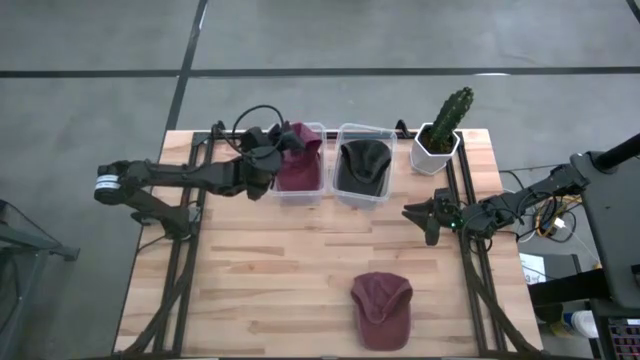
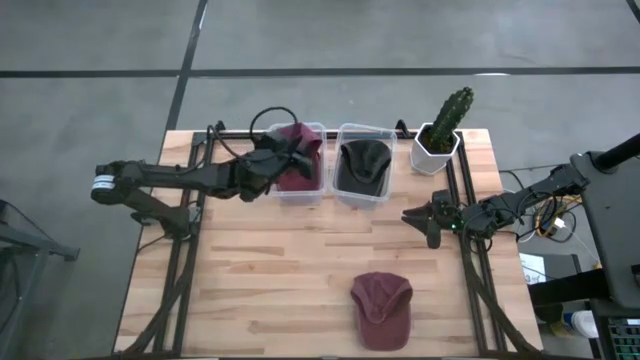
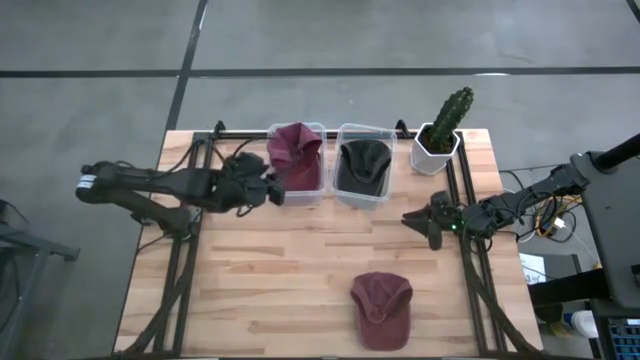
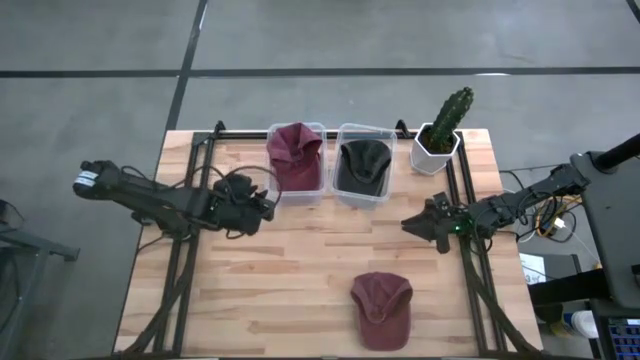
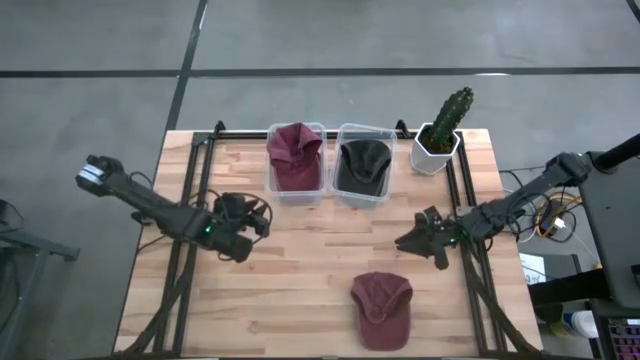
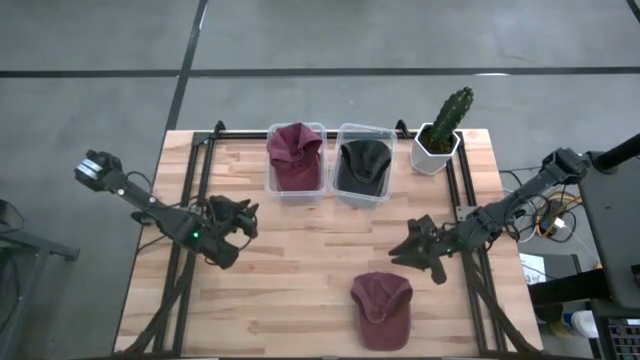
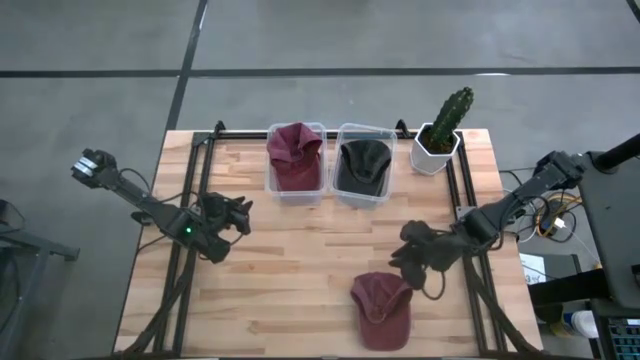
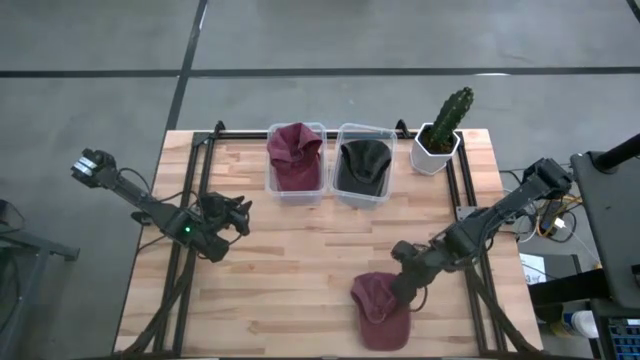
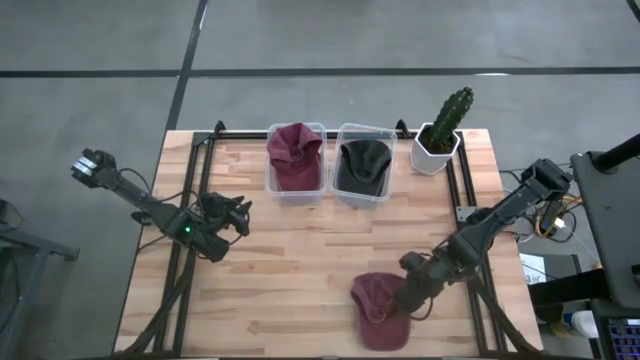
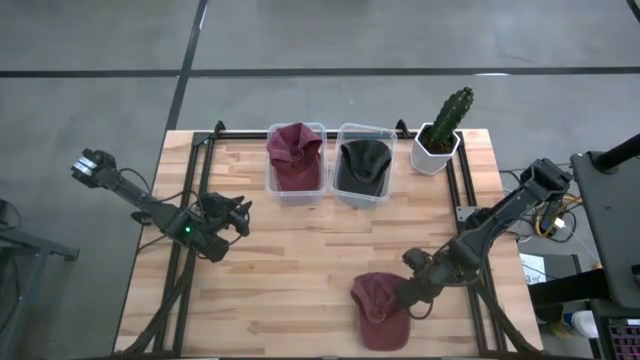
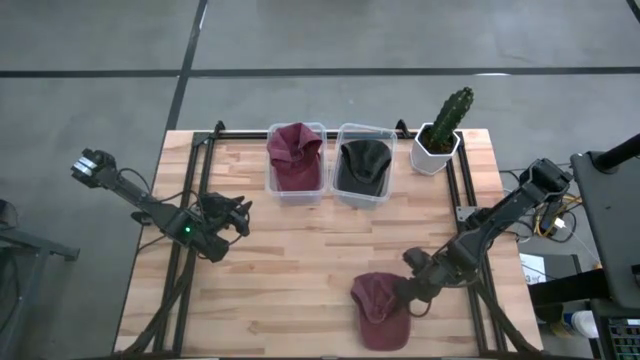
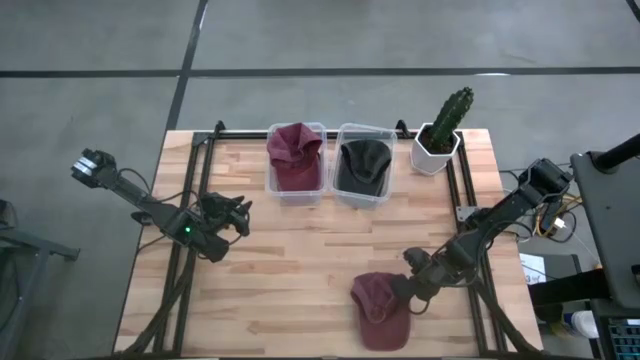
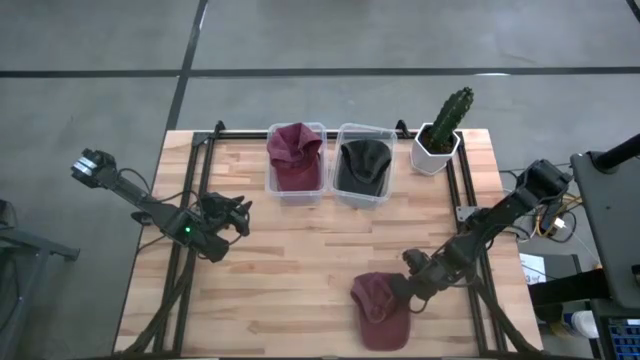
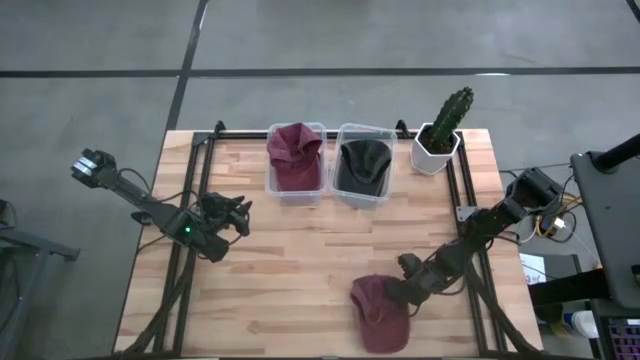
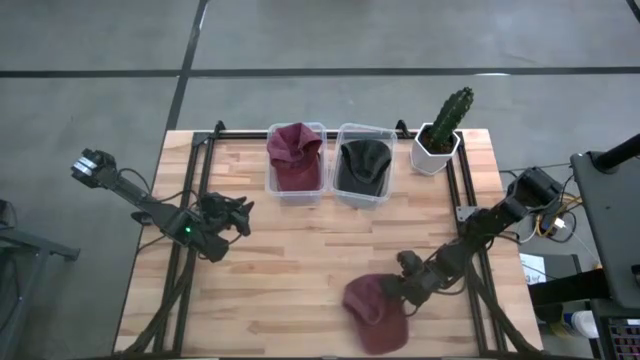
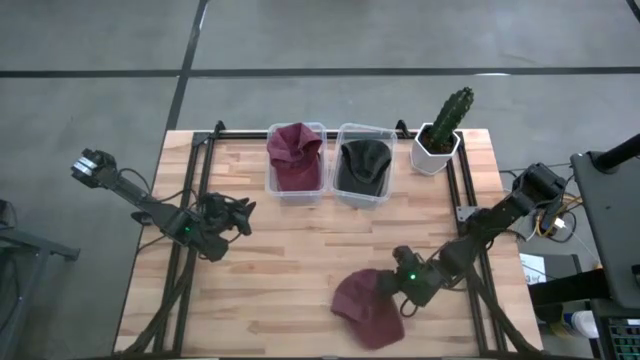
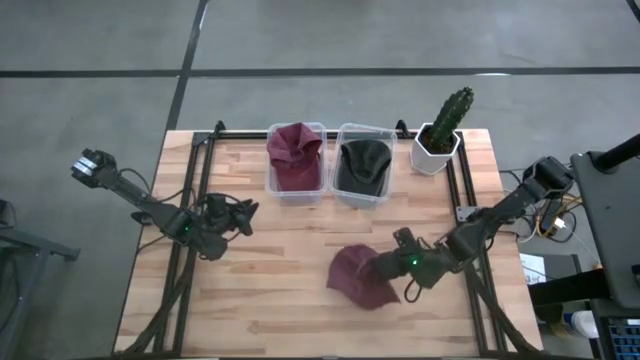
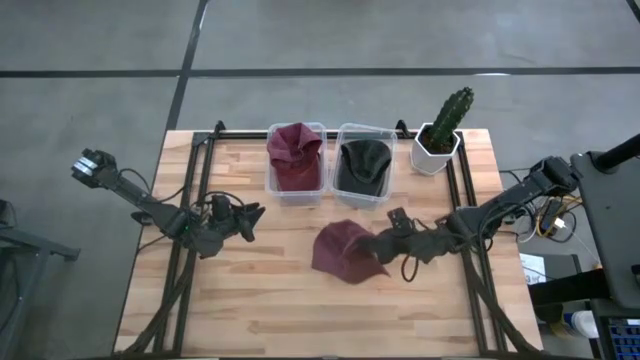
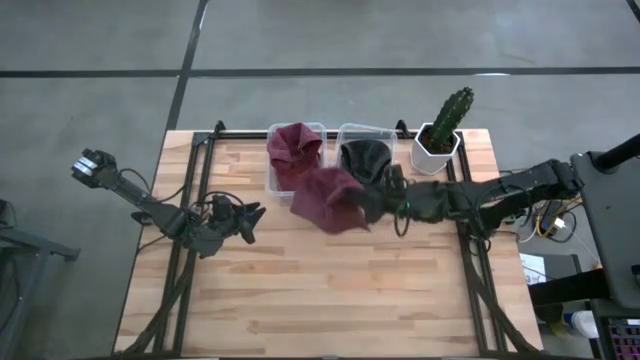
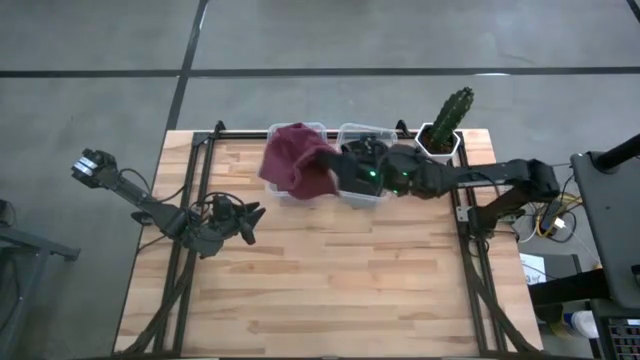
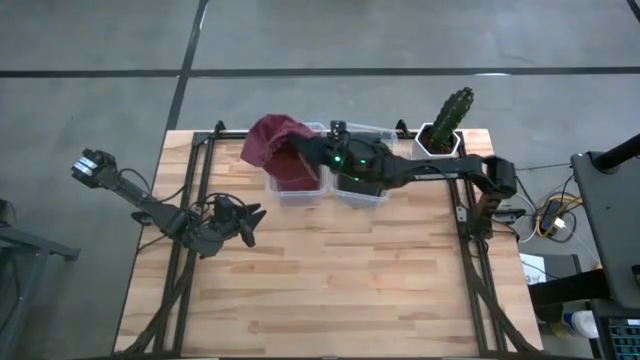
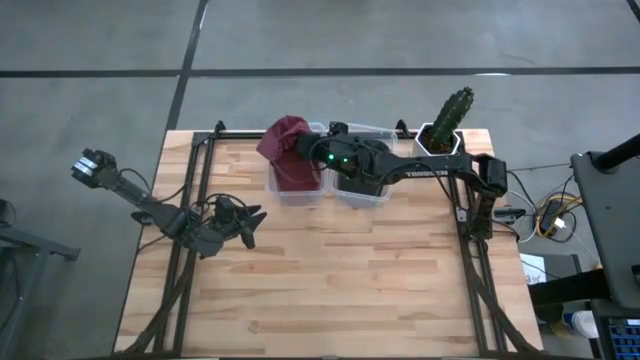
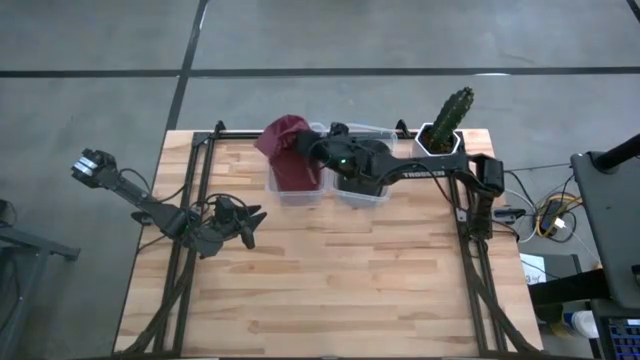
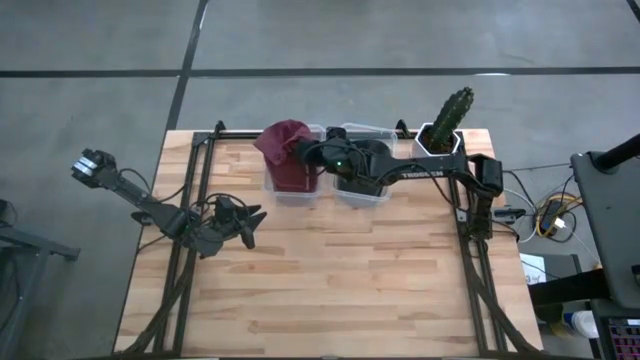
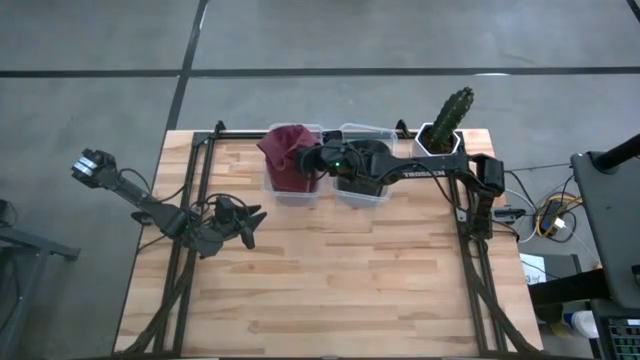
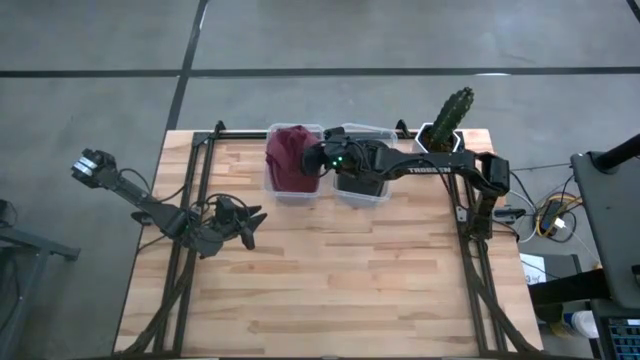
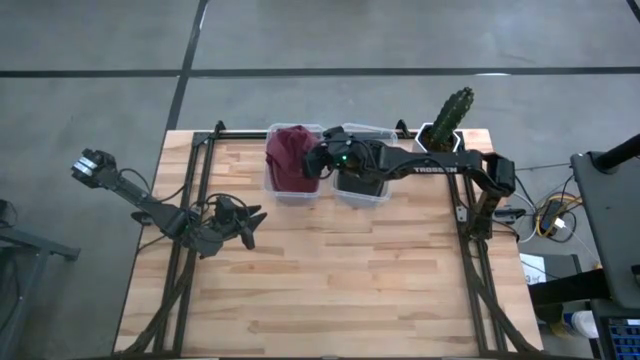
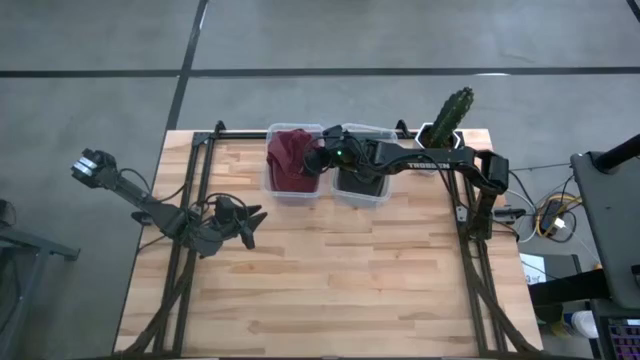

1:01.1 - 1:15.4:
Task: Pick & Place hat
Put the red cap into the left transparent bin

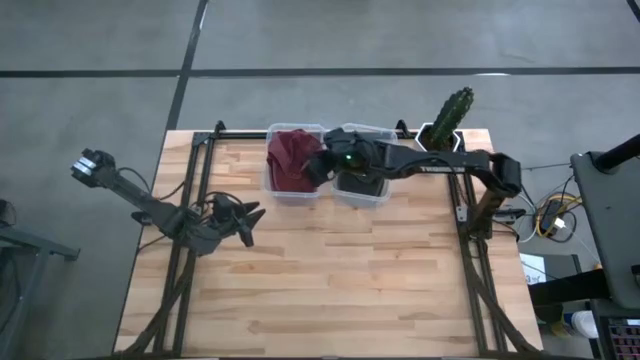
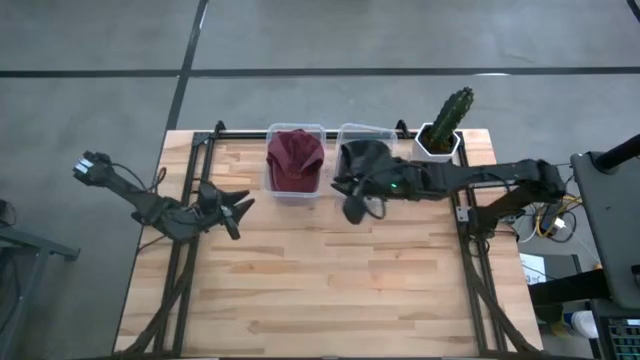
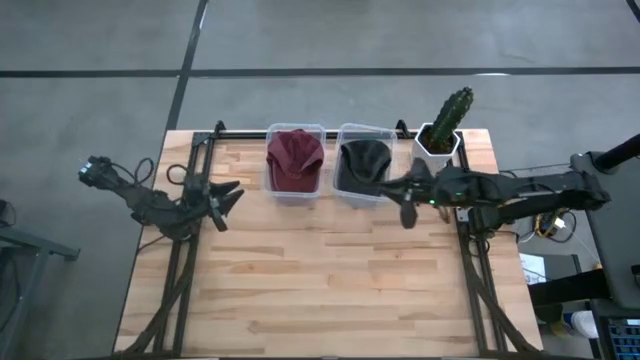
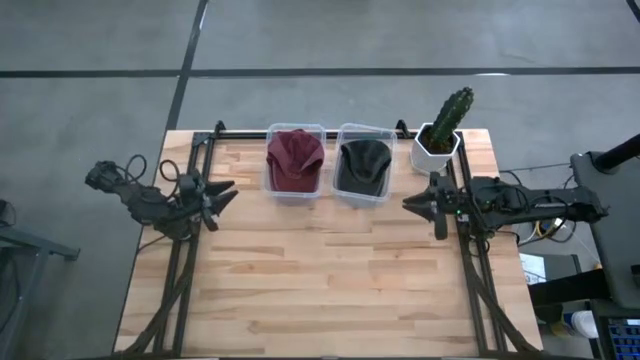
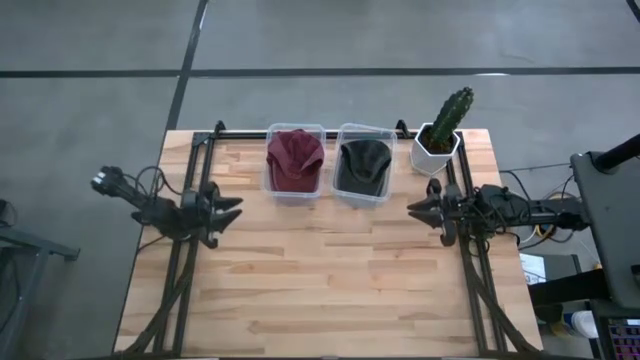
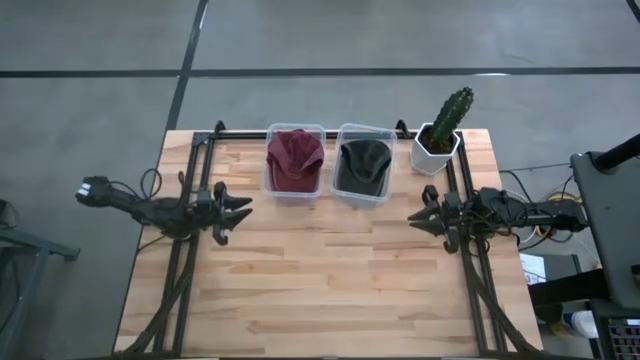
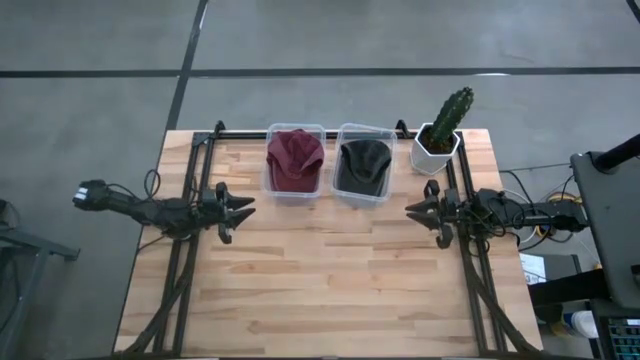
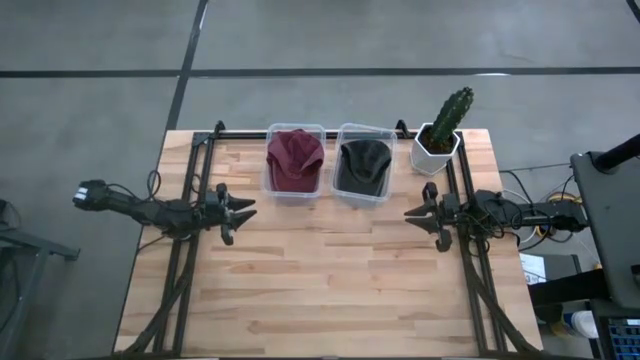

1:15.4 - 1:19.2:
Return to Home Position

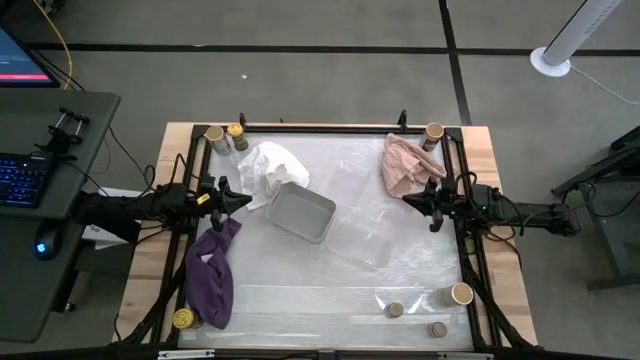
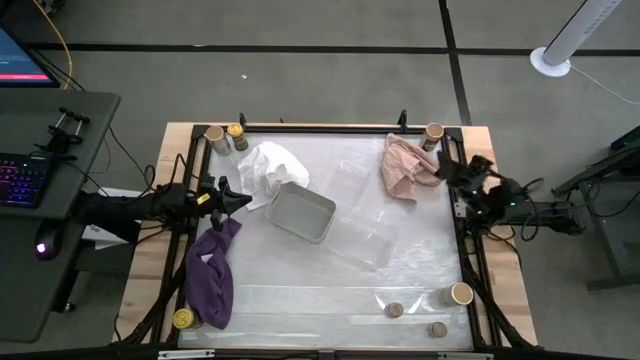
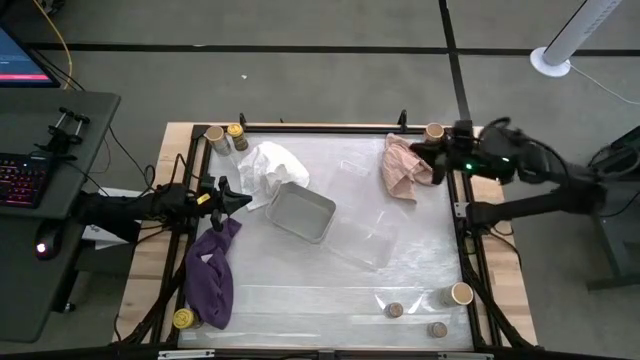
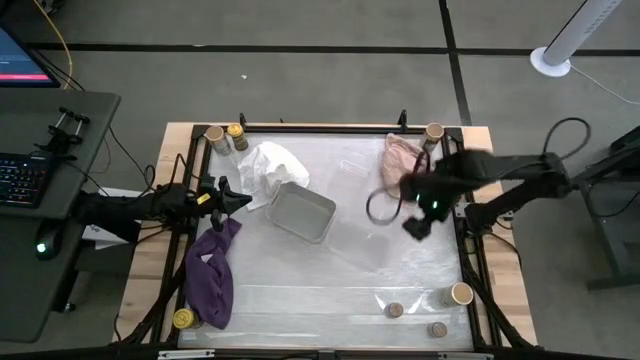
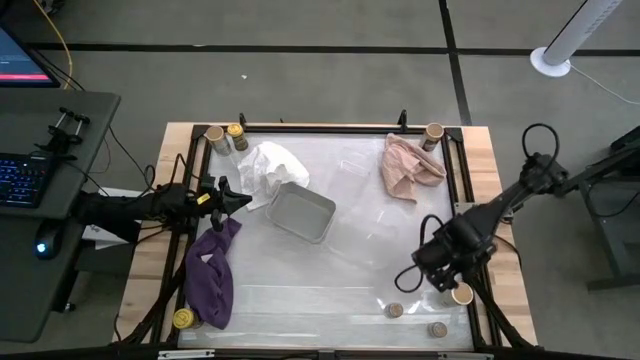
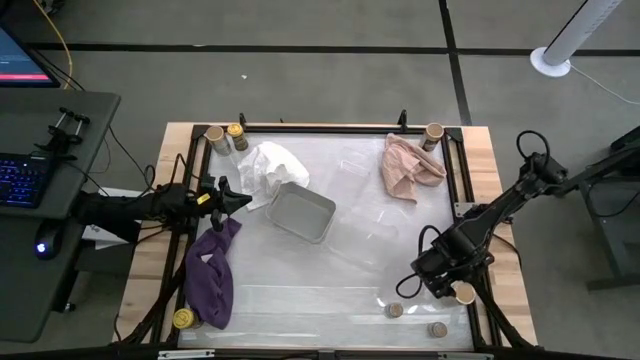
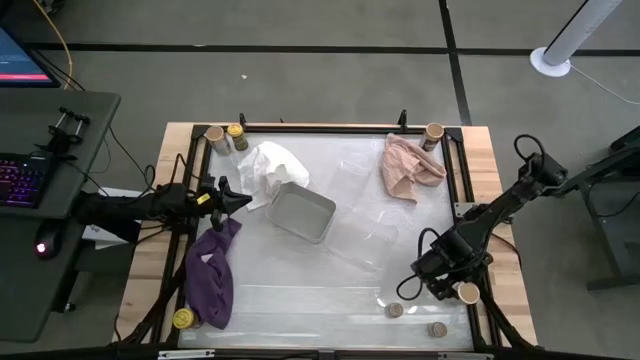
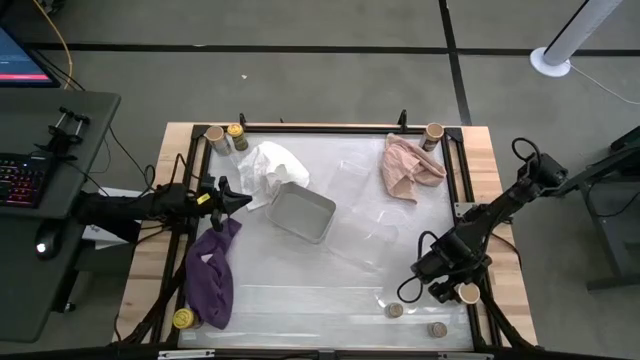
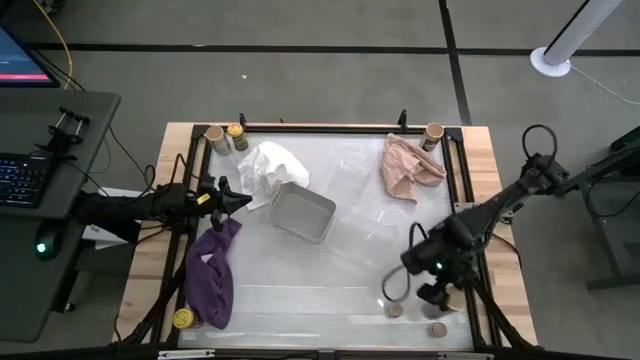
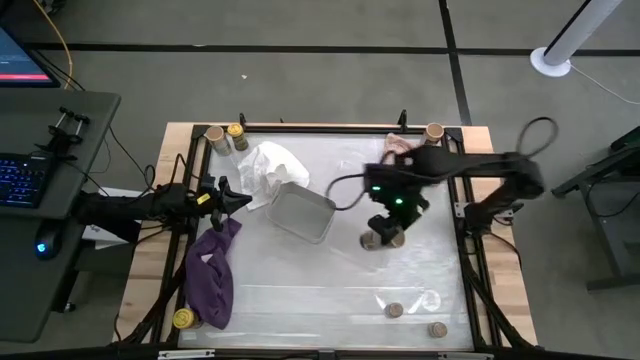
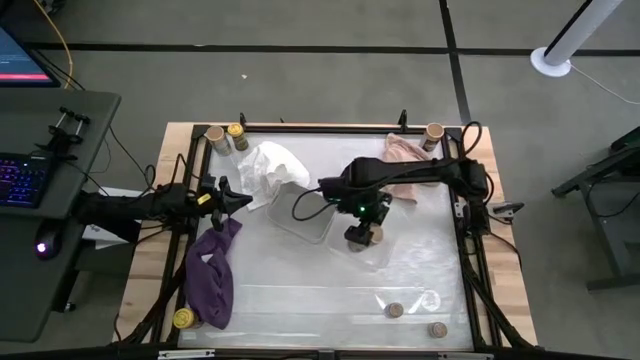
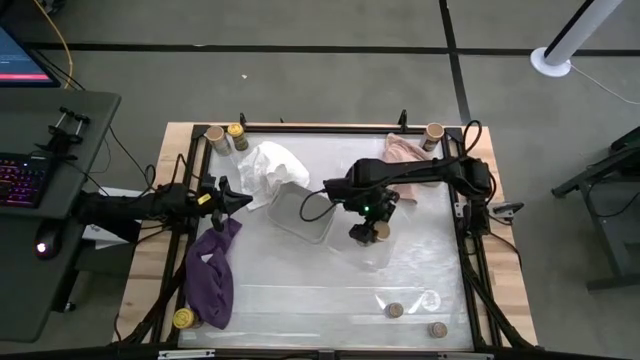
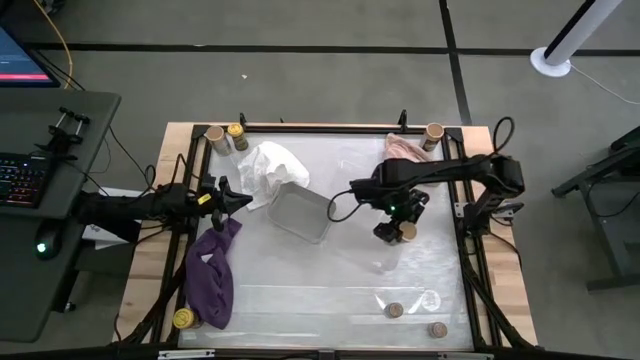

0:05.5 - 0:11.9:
Task: Sort spices by type
Put the bottom gold seasoning bottle into the bottom transparent bin
